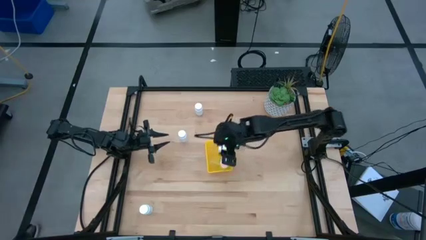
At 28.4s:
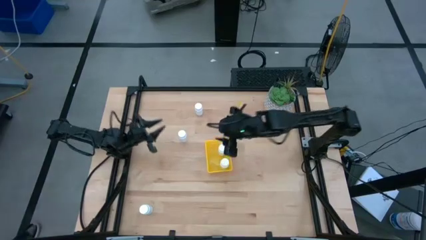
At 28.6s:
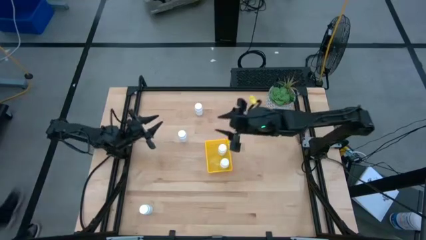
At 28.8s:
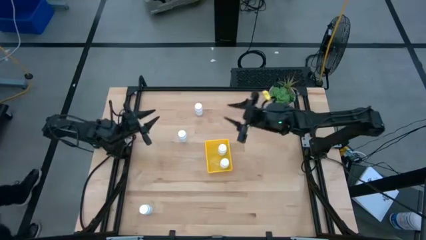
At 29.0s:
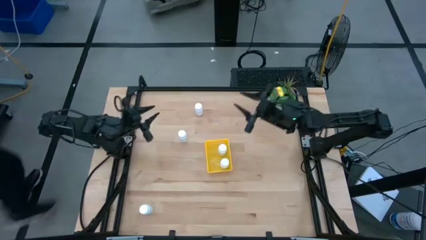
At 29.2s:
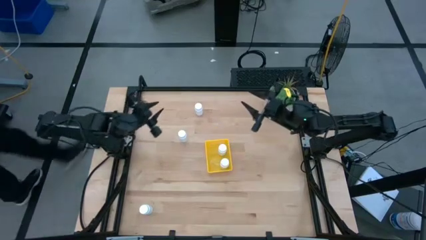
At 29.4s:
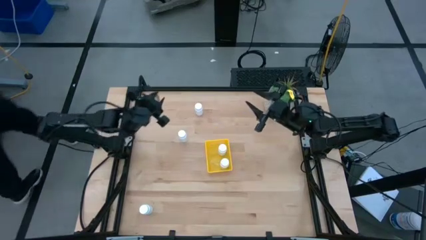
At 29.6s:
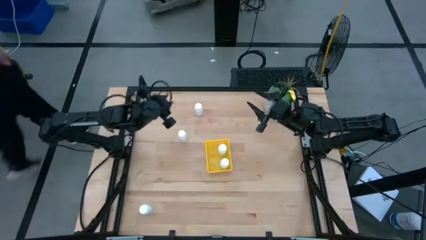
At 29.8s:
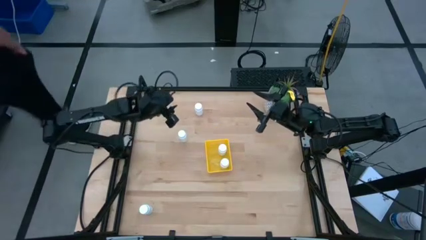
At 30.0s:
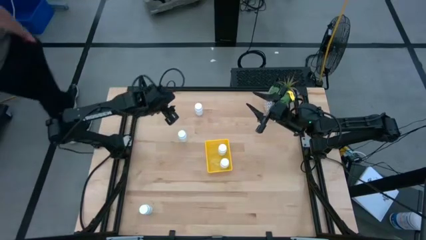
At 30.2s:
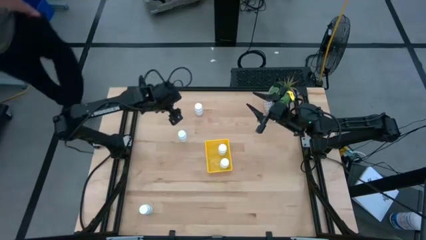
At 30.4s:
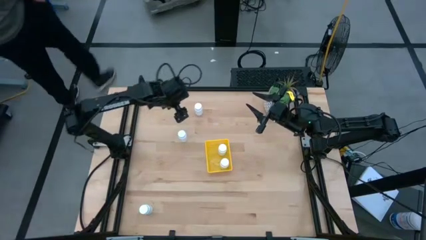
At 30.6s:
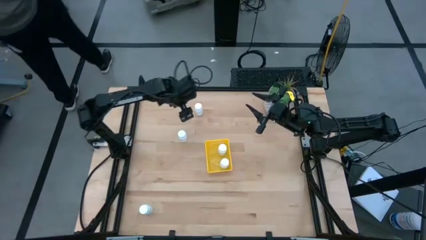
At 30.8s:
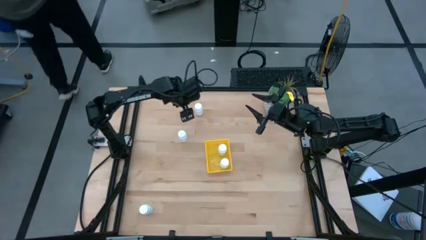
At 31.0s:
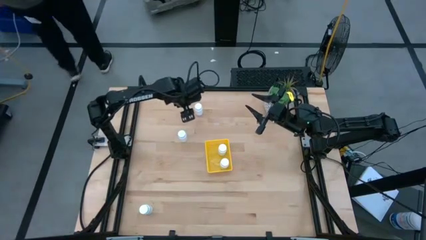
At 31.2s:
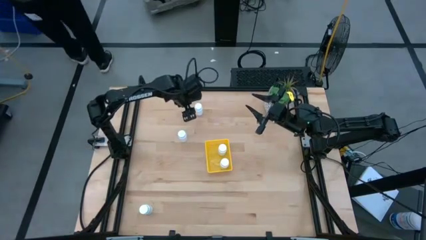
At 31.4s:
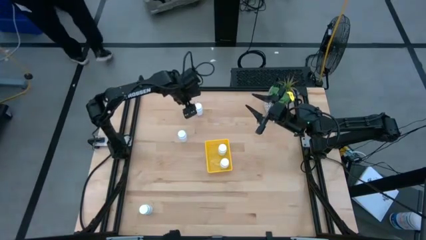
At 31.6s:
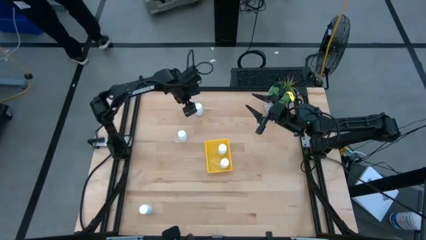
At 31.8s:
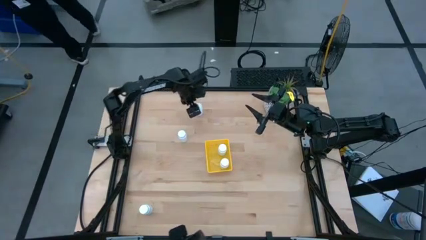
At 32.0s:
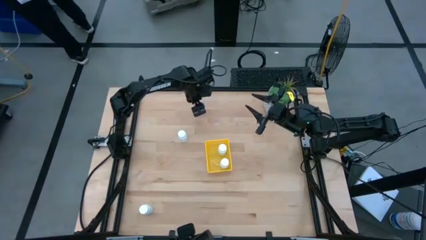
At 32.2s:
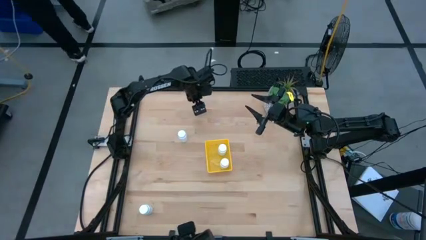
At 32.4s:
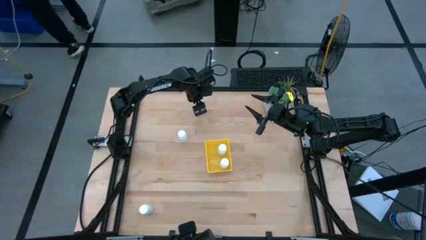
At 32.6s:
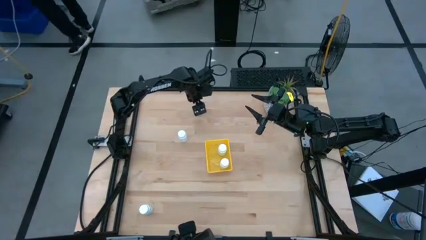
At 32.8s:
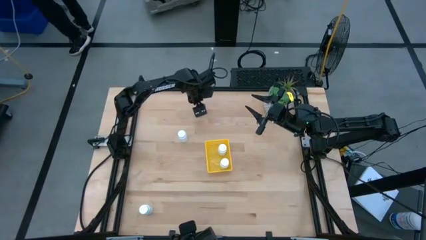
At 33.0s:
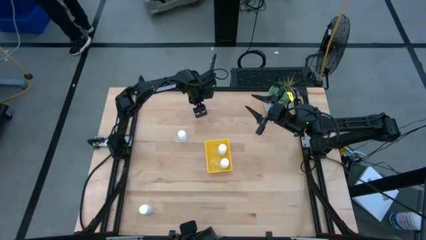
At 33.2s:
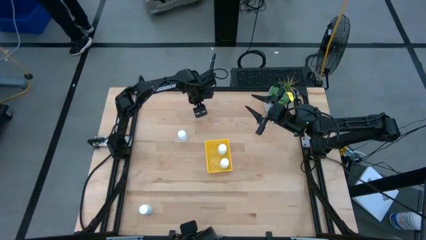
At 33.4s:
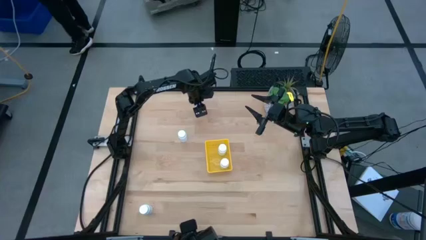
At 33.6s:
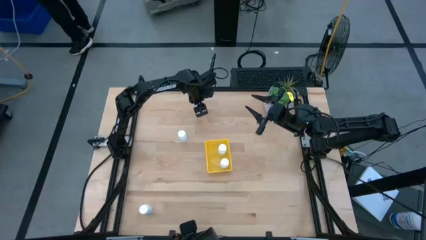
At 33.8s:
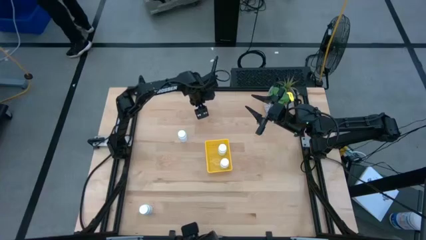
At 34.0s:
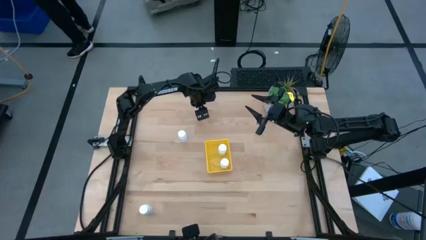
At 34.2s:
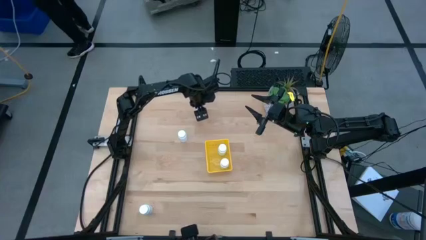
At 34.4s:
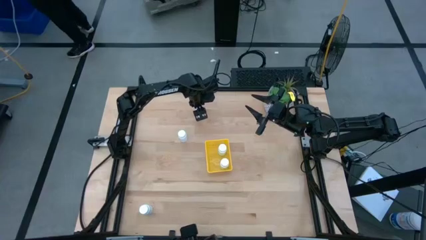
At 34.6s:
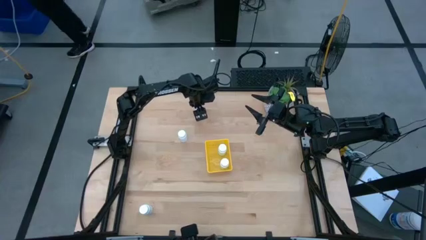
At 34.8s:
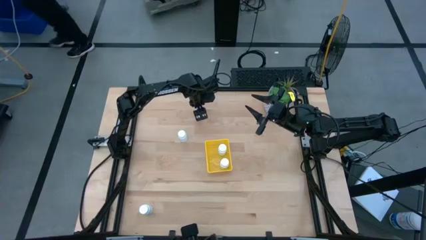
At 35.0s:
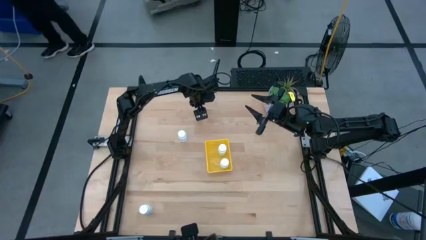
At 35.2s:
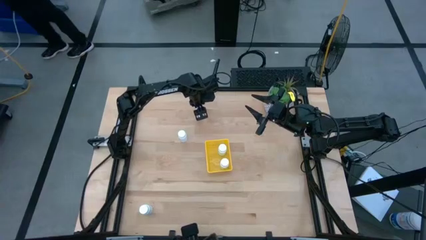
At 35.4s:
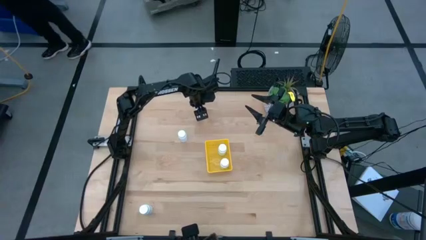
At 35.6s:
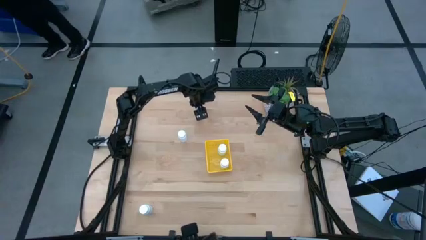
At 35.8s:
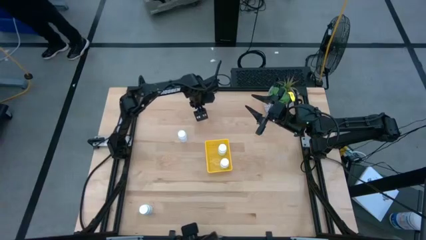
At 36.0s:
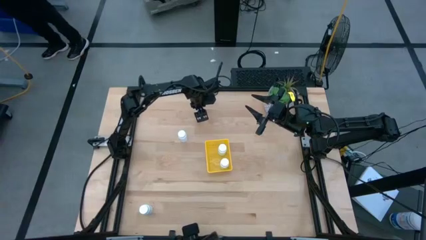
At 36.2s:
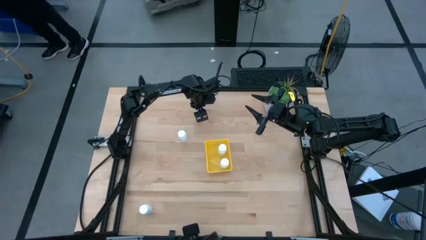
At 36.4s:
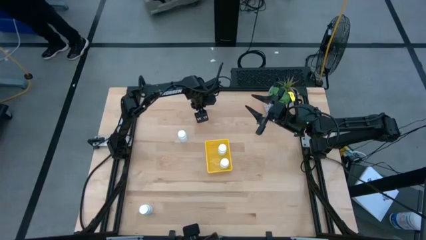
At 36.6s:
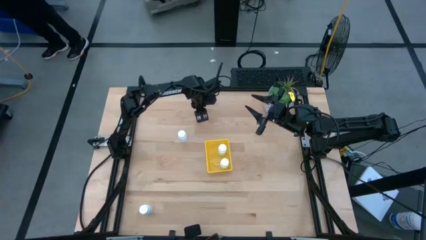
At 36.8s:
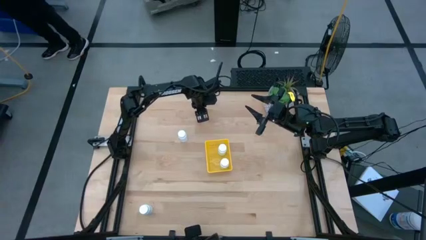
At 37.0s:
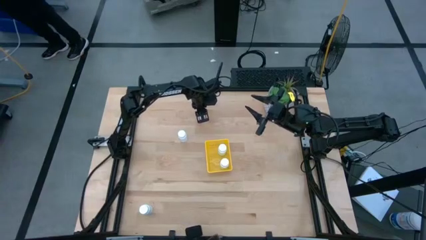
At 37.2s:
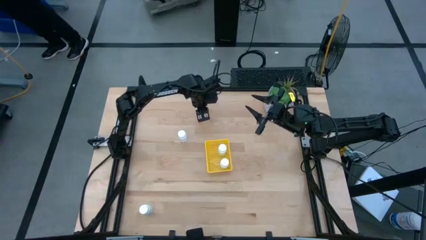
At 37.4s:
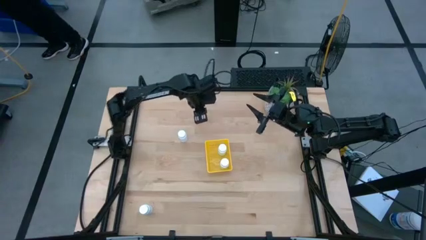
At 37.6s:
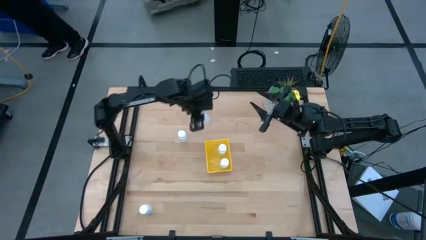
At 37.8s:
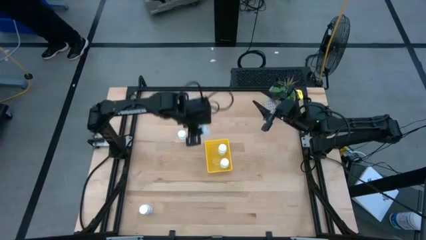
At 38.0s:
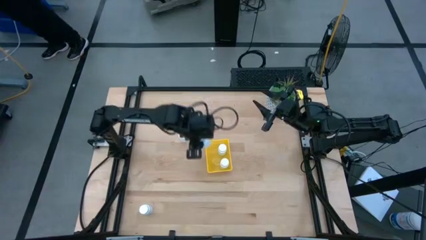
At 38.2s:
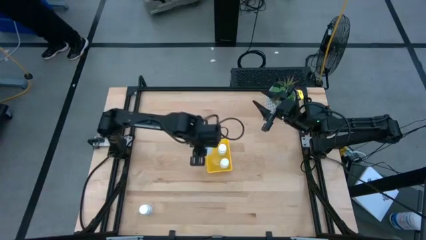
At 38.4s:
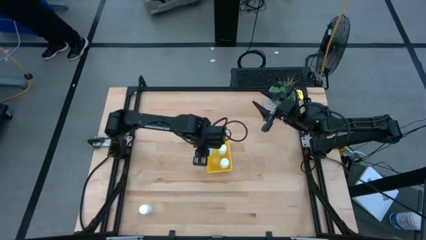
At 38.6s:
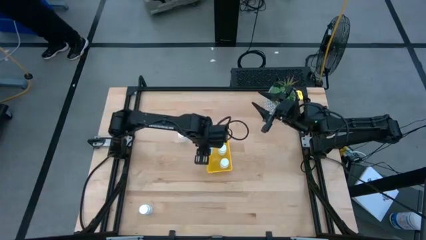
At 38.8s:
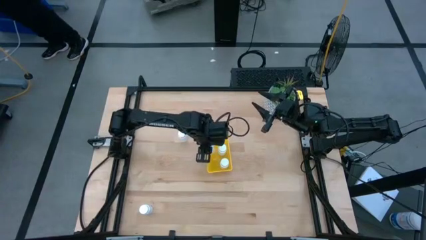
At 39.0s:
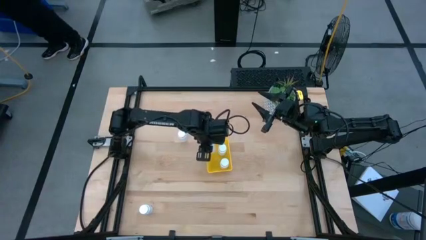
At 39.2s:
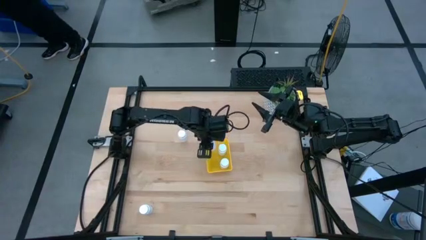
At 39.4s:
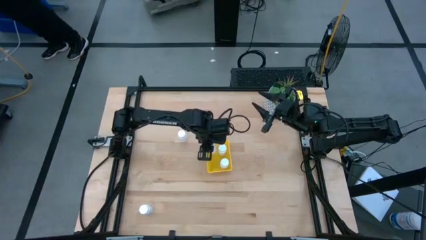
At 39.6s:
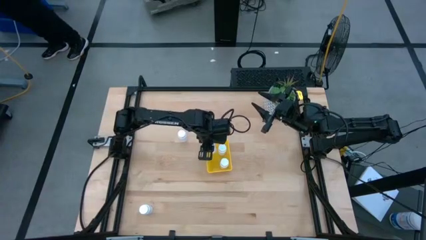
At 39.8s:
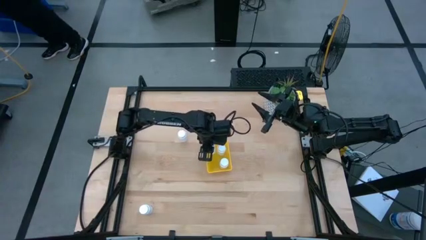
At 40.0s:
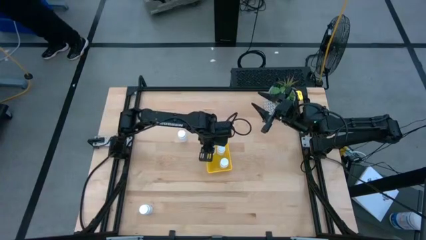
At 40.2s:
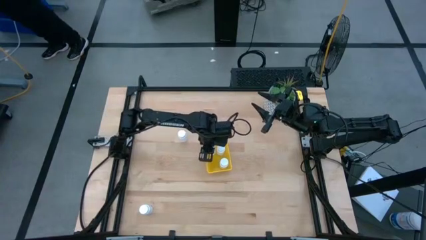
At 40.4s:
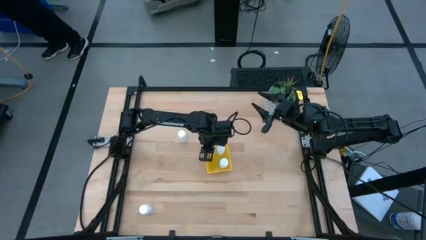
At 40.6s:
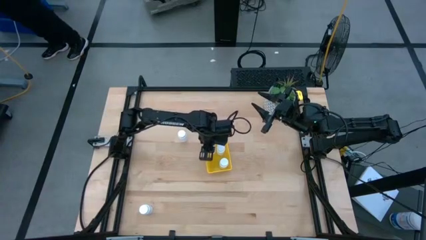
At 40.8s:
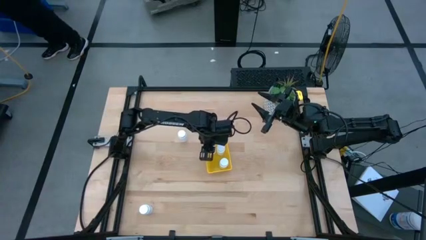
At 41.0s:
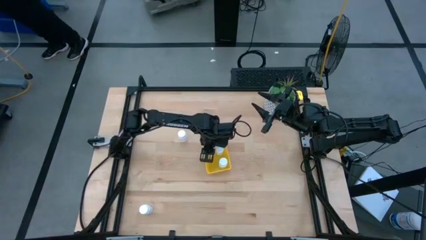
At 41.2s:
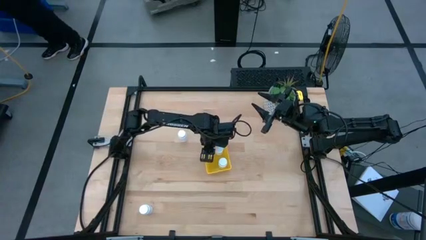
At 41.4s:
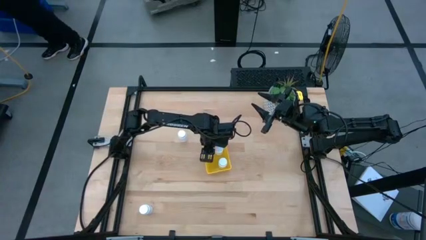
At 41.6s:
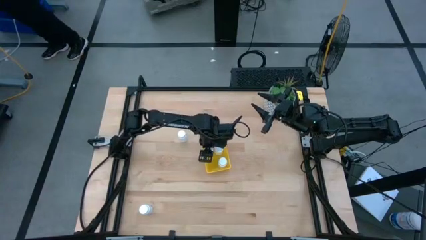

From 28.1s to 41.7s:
Task: Pick and place pill bottles into a basket
Put the white pill bottle into the yellow bin

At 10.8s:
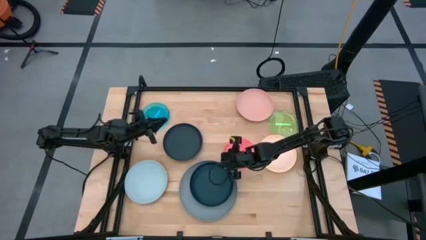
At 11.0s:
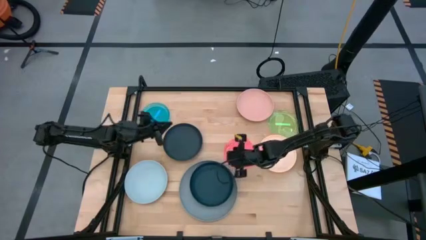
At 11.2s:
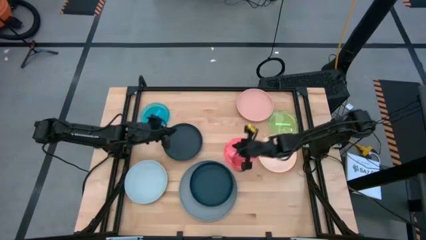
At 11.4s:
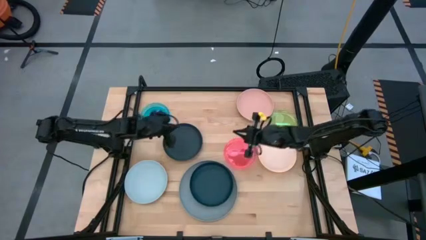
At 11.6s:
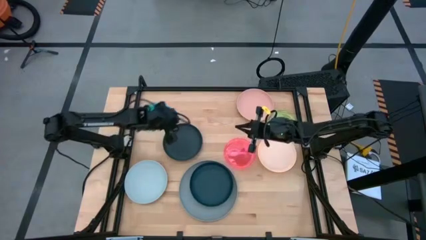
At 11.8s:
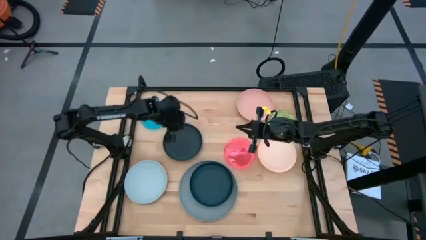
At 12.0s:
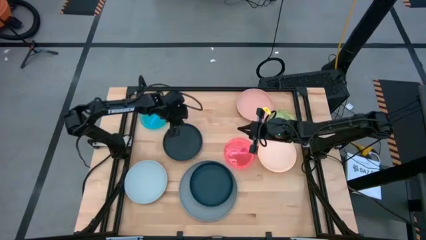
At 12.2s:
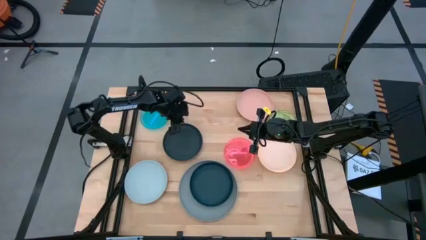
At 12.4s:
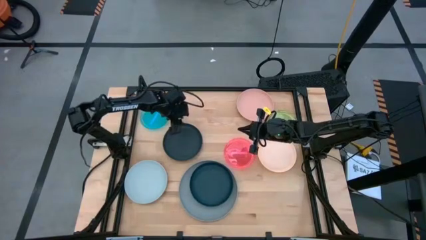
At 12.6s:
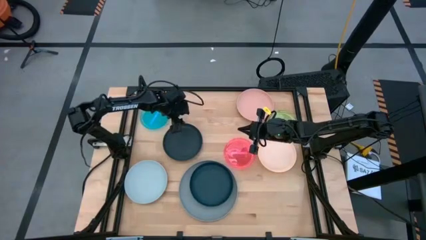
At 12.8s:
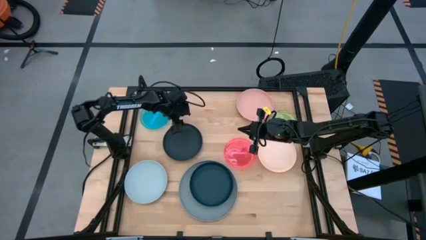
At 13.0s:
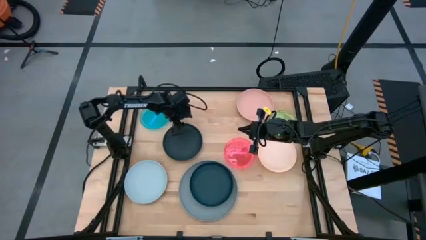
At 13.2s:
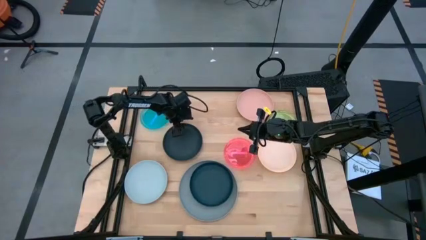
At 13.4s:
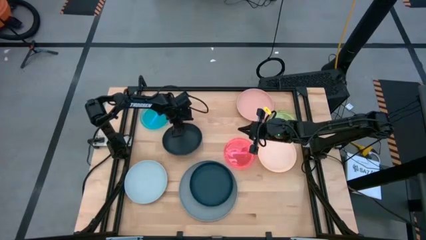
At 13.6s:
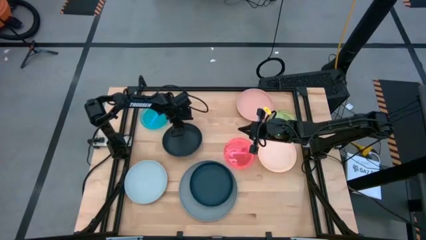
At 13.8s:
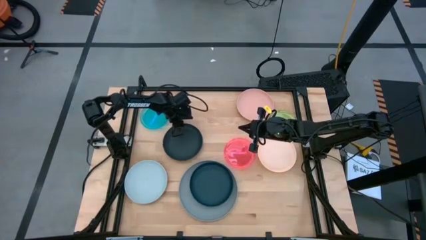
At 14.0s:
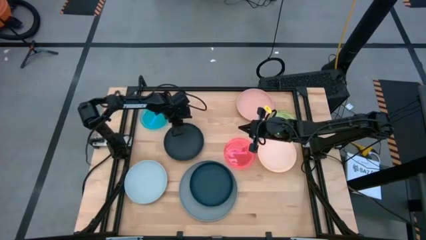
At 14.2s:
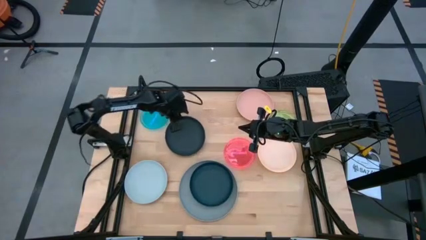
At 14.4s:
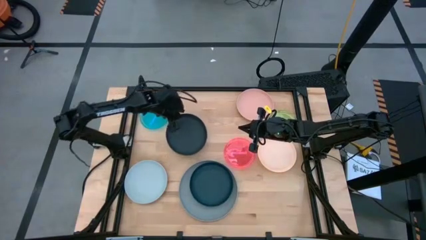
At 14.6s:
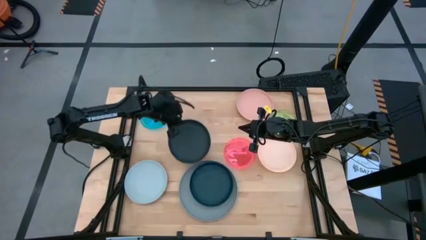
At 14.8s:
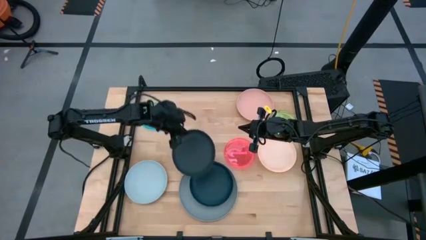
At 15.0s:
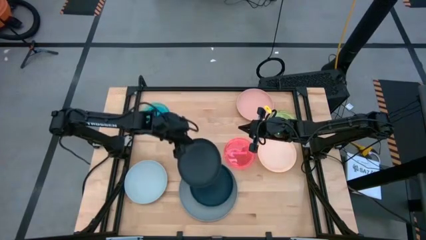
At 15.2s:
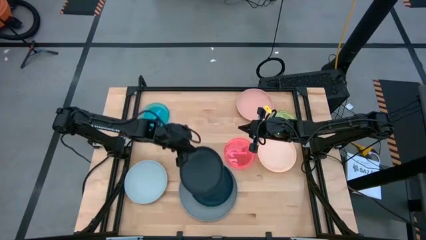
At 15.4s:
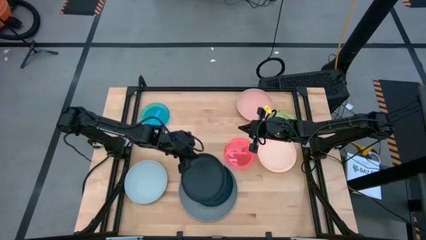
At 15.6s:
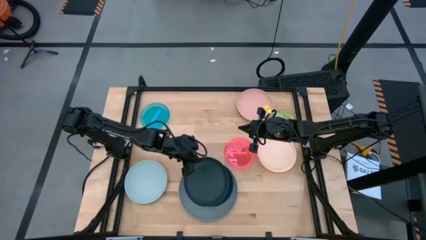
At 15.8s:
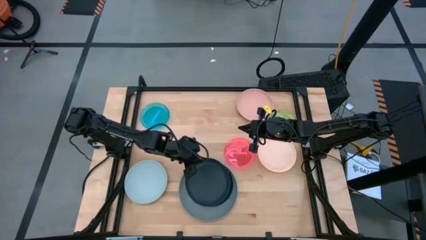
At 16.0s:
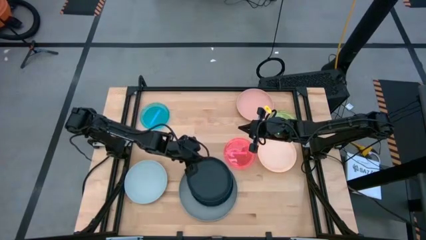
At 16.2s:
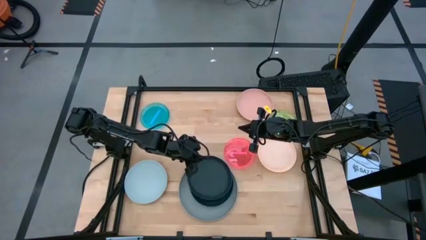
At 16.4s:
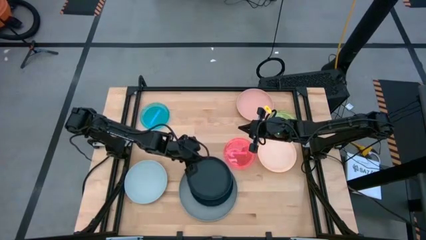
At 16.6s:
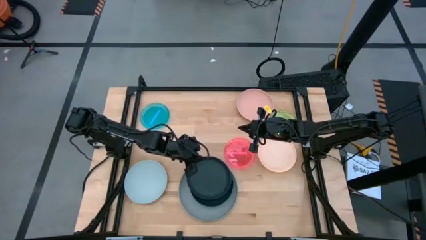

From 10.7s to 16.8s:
Task: Stack plastic plates
Stack the black plate on top of the dark blue plate
